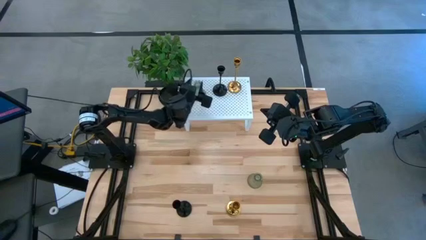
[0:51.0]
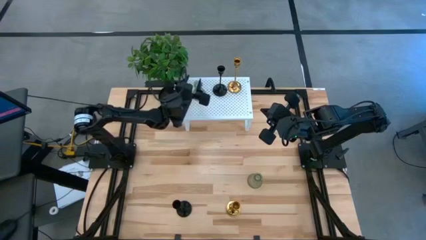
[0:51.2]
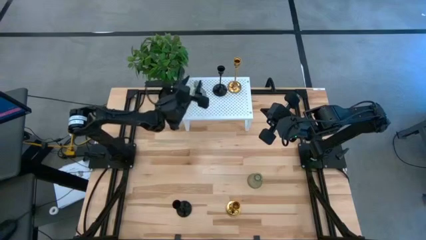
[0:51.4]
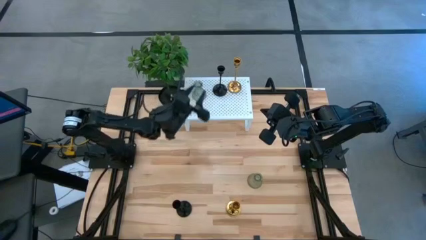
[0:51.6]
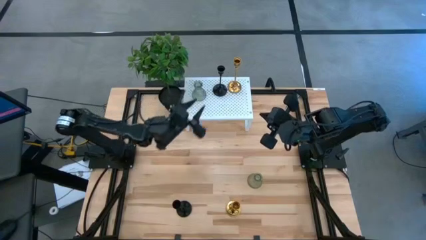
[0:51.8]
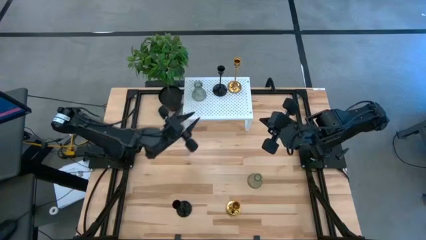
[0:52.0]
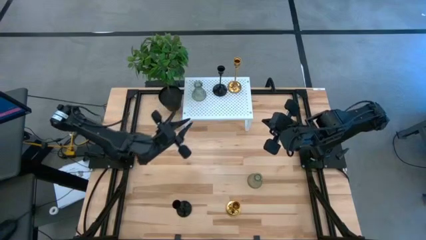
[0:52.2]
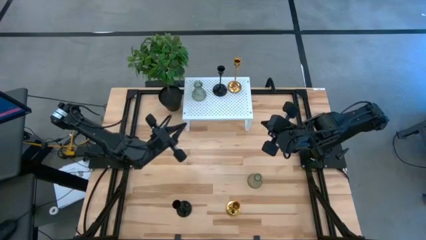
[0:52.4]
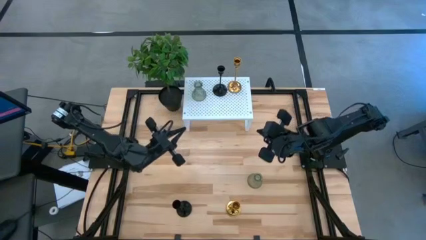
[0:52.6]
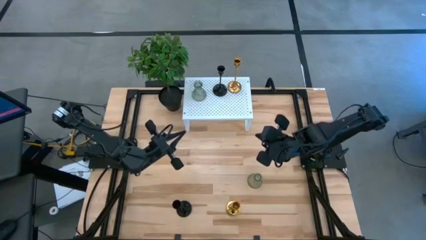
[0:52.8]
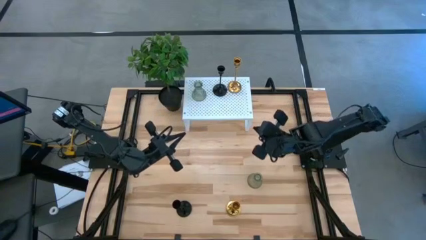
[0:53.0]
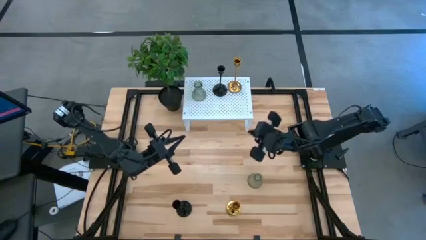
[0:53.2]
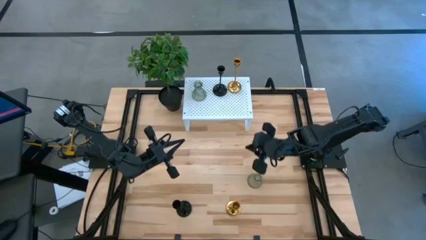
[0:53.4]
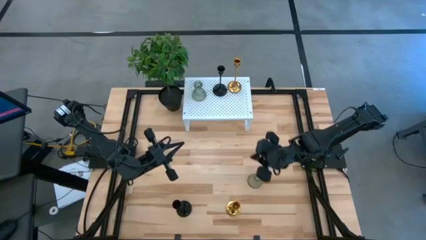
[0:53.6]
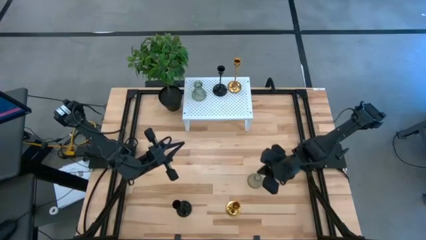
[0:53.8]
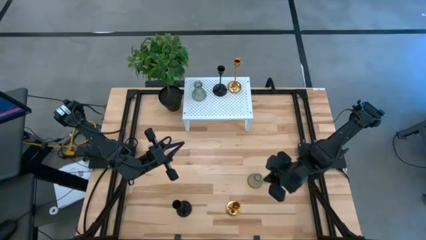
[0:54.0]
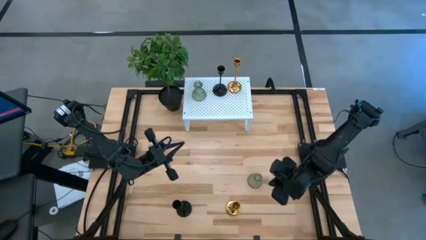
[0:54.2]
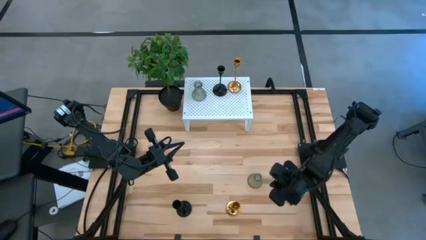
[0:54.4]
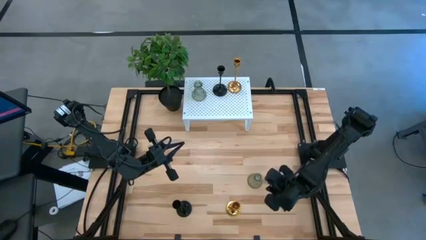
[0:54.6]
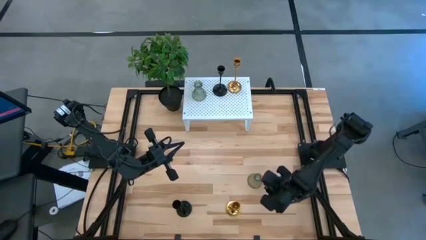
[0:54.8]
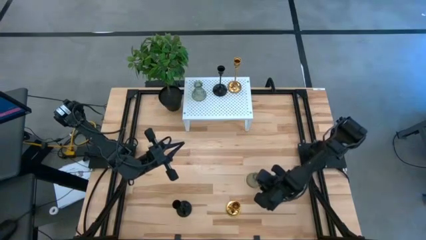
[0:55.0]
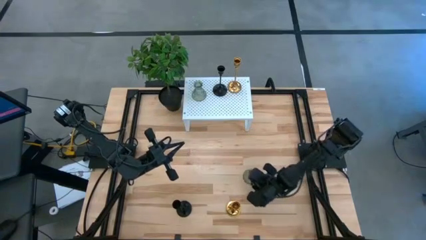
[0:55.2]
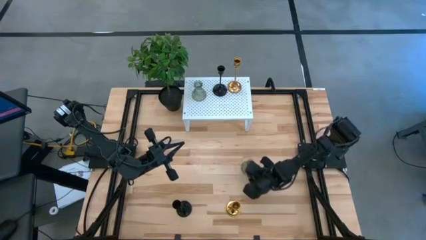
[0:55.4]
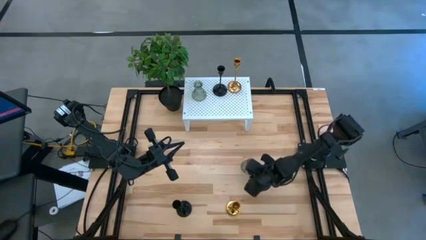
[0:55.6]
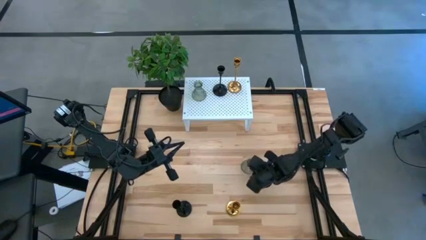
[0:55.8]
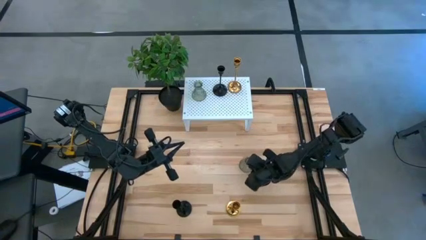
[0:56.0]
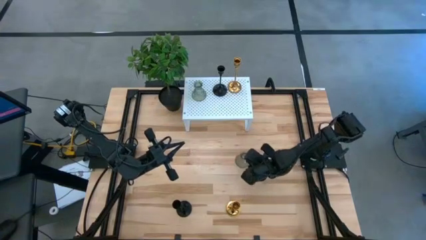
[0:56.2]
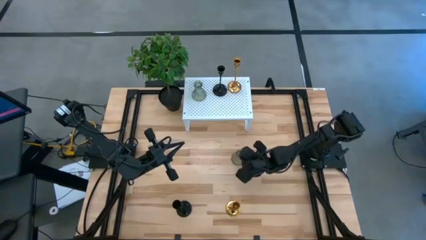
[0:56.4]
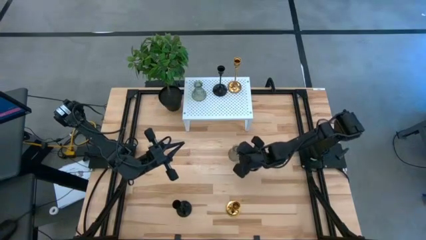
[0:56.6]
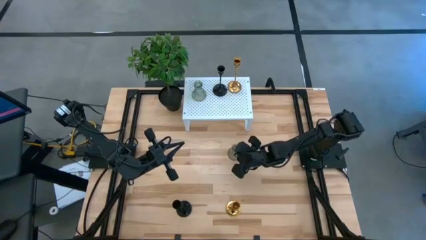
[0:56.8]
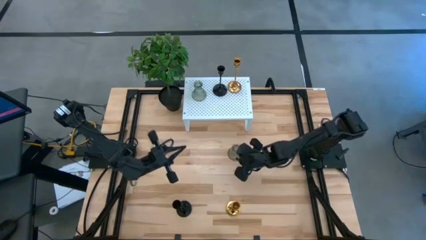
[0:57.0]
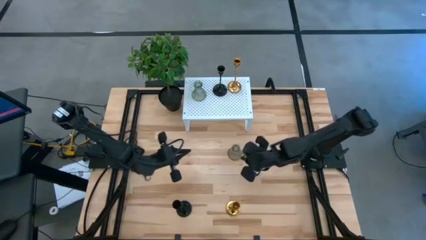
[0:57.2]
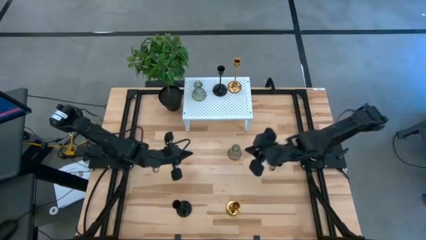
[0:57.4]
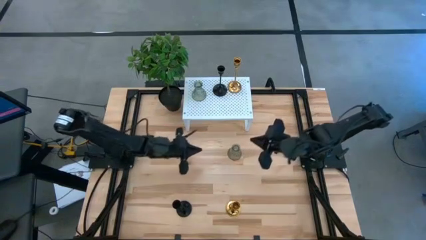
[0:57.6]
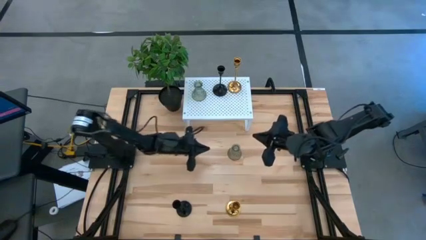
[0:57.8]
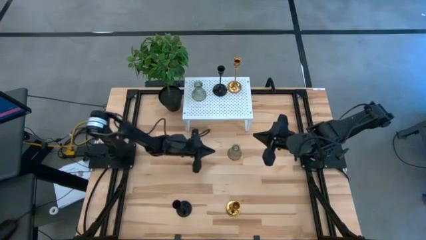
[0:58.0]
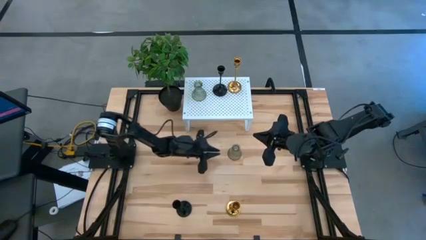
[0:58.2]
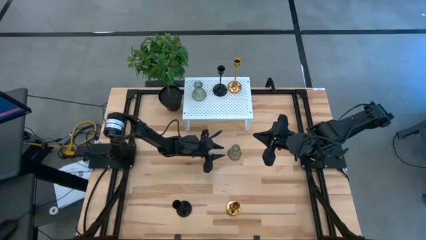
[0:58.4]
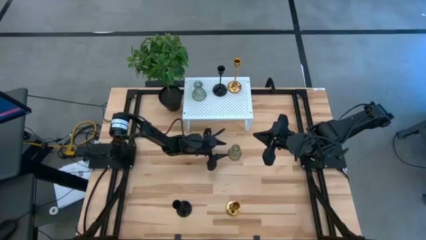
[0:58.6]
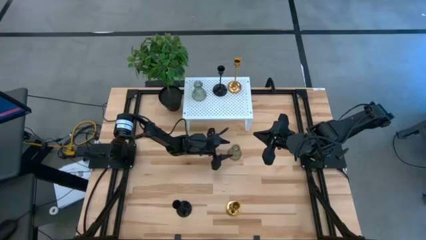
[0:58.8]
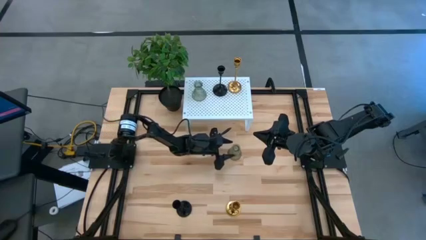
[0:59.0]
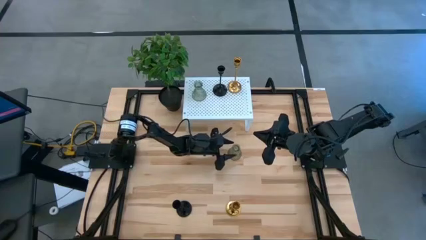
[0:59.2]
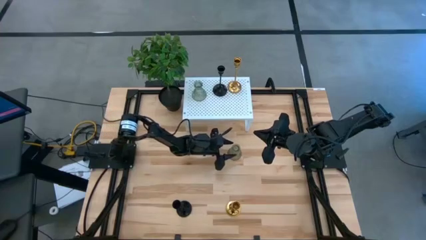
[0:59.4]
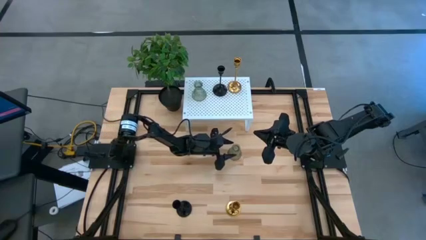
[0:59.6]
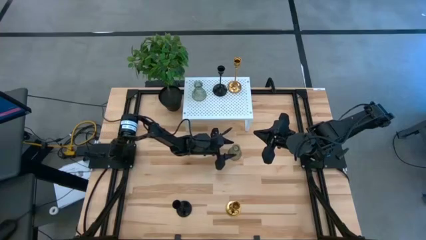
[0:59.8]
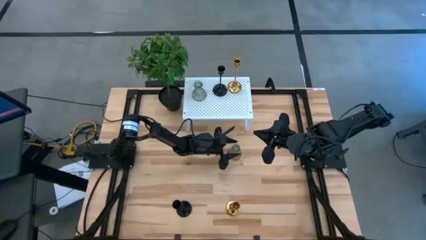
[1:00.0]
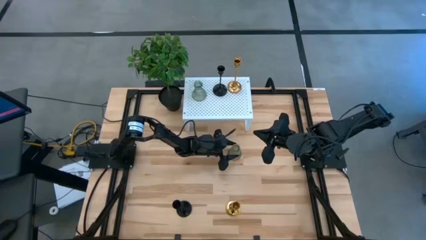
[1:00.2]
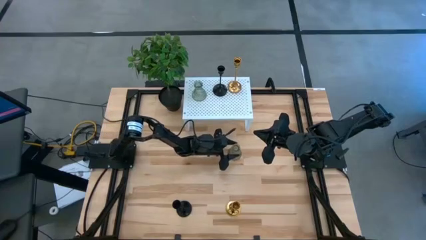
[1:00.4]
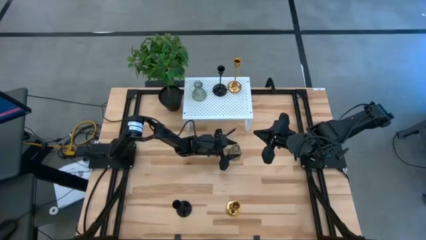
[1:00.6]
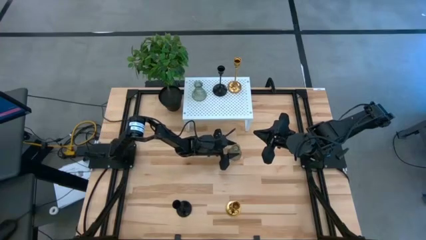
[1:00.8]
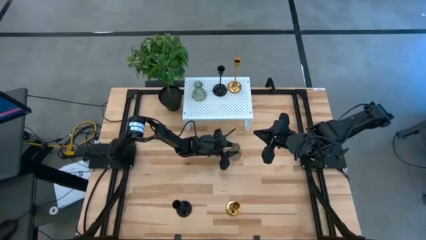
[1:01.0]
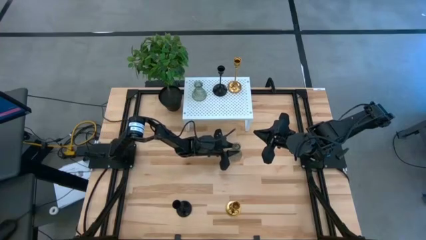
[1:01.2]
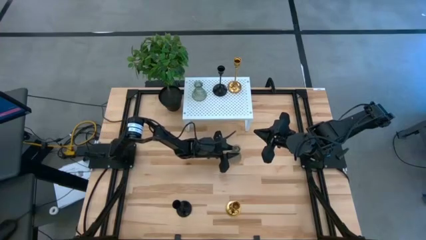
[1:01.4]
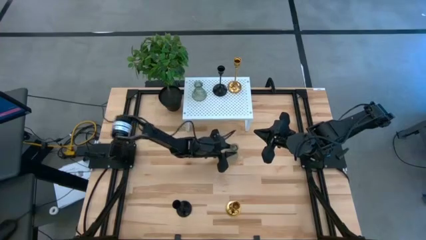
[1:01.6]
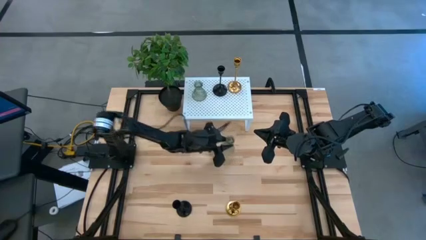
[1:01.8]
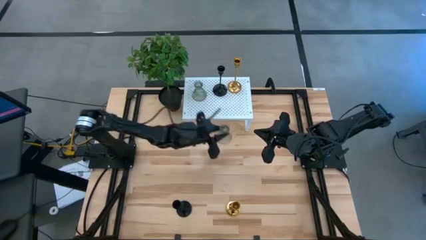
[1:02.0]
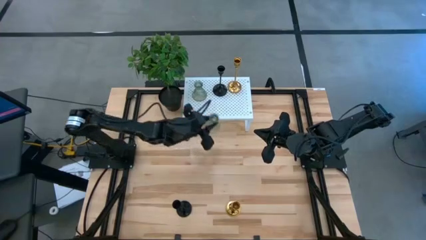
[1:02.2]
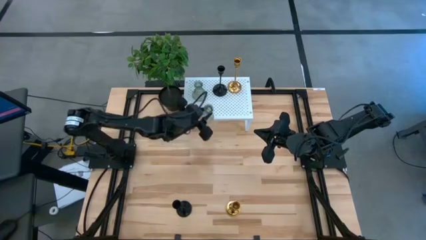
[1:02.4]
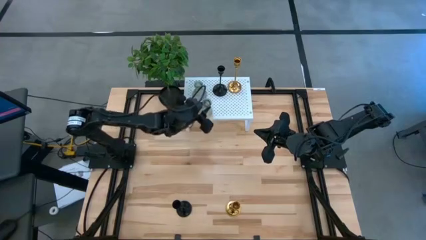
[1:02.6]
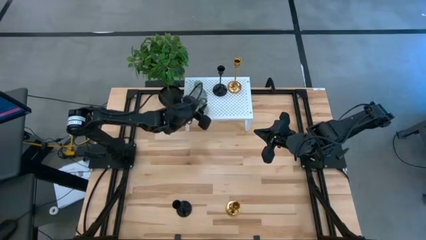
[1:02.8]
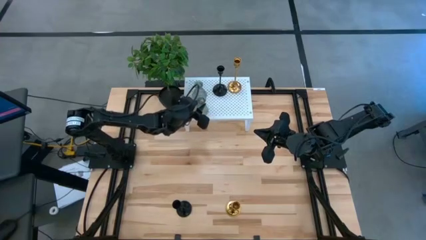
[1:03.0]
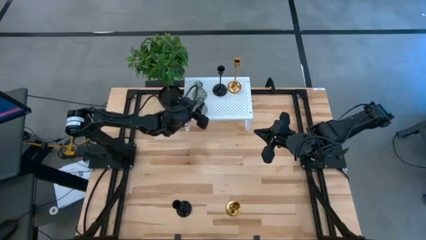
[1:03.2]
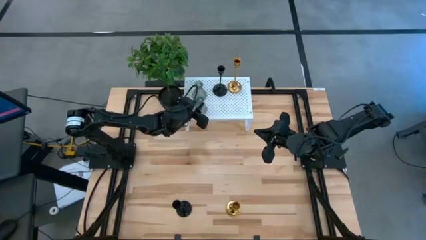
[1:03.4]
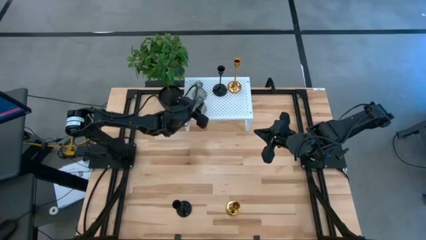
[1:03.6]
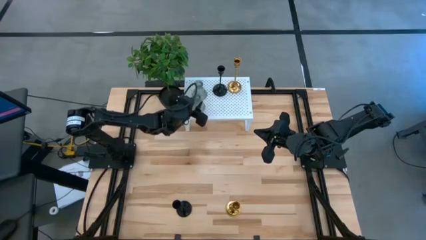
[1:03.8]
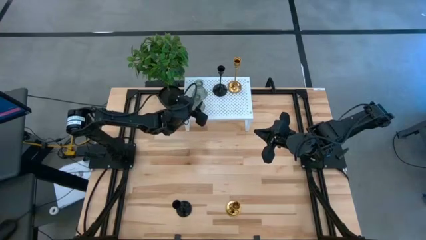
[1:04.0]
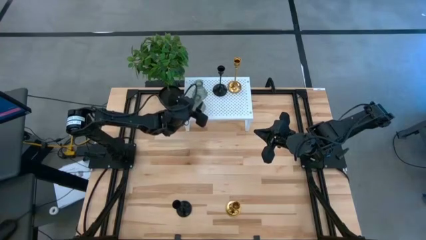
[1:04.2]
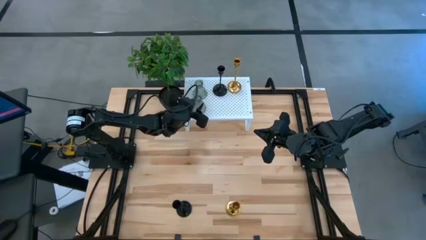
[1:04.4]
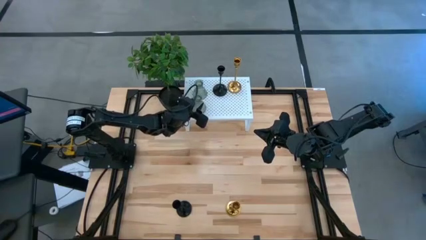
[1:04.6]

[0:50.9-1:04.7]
Task: Pick & Place candle stick holders
Put the green glass candle holder on the shelf aligned with the other green glass candle holder
